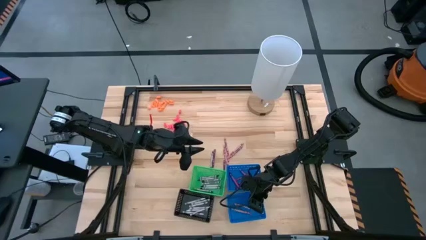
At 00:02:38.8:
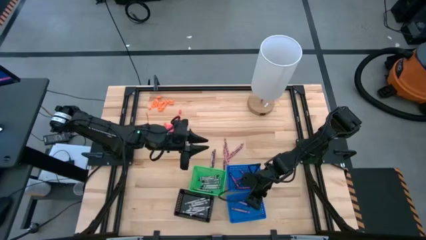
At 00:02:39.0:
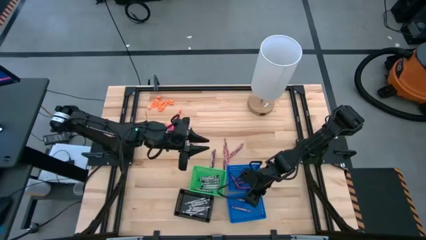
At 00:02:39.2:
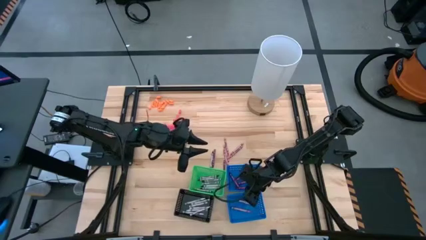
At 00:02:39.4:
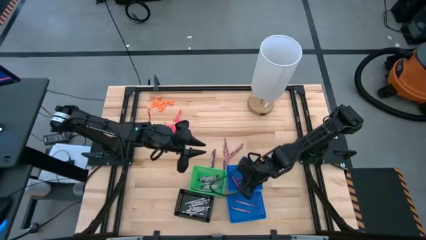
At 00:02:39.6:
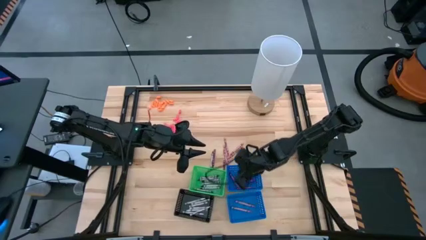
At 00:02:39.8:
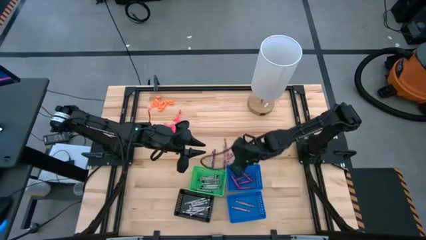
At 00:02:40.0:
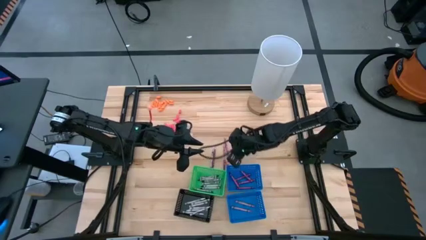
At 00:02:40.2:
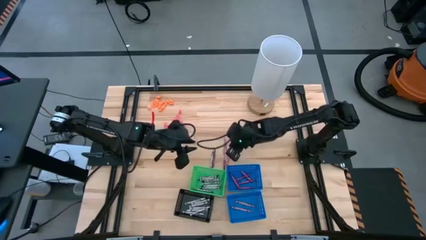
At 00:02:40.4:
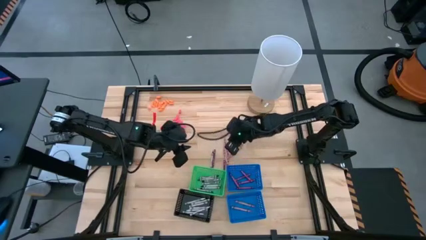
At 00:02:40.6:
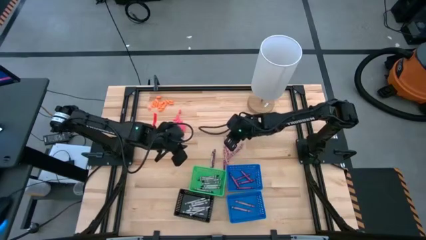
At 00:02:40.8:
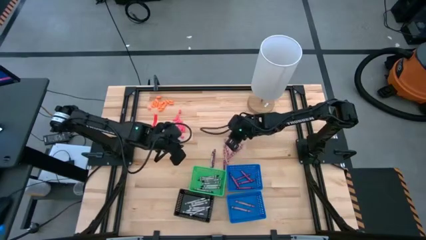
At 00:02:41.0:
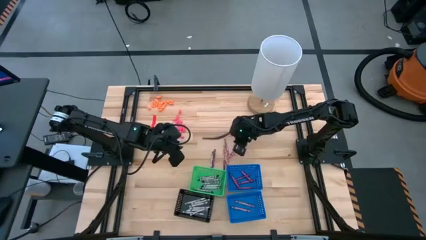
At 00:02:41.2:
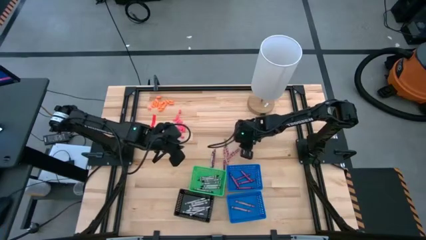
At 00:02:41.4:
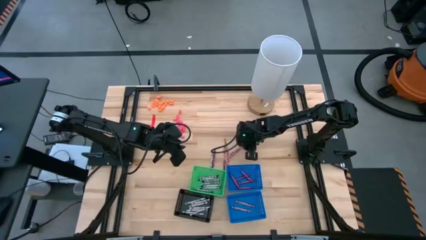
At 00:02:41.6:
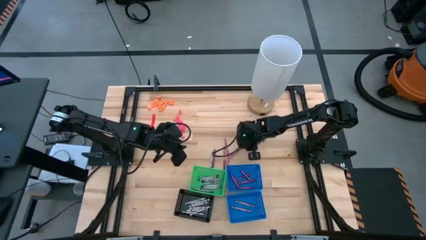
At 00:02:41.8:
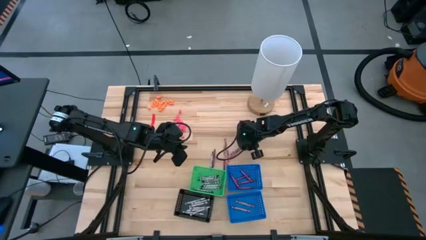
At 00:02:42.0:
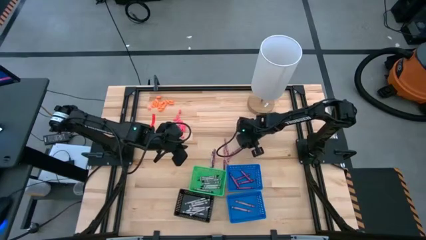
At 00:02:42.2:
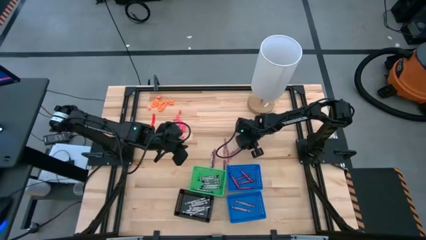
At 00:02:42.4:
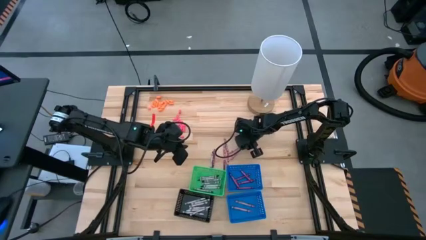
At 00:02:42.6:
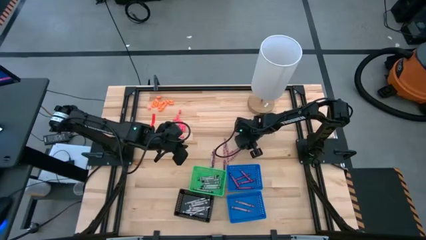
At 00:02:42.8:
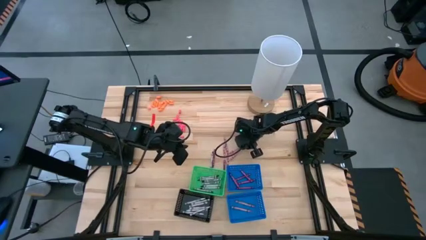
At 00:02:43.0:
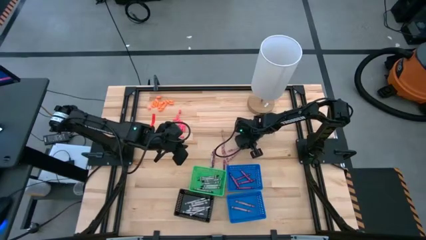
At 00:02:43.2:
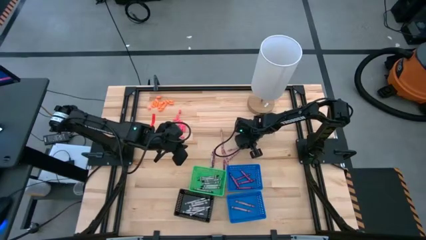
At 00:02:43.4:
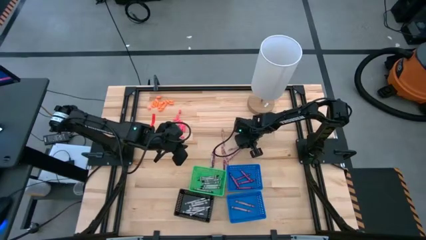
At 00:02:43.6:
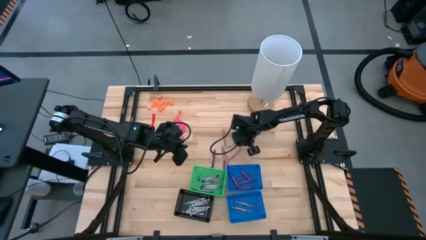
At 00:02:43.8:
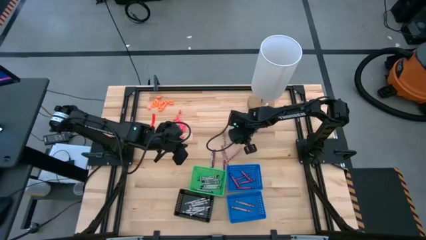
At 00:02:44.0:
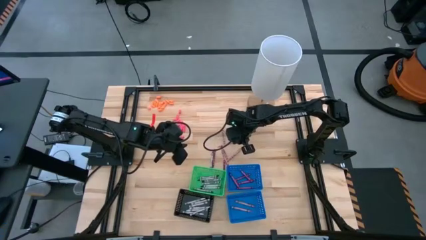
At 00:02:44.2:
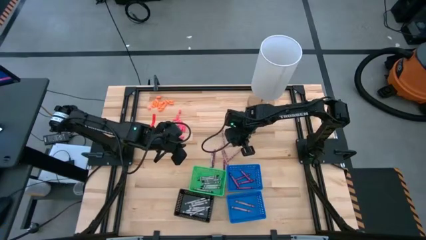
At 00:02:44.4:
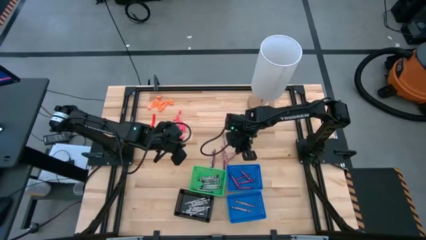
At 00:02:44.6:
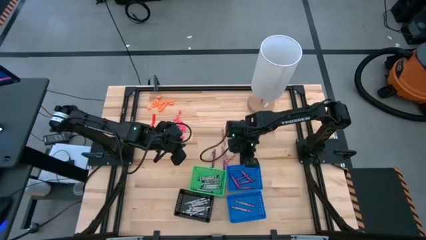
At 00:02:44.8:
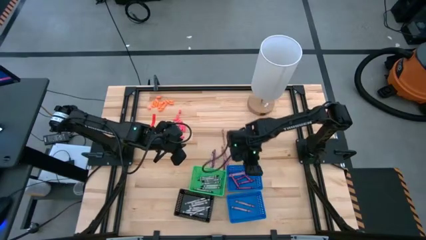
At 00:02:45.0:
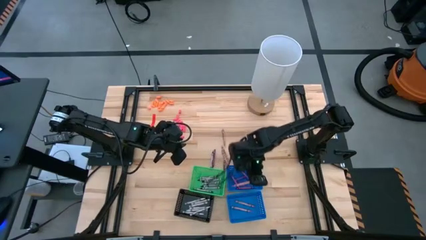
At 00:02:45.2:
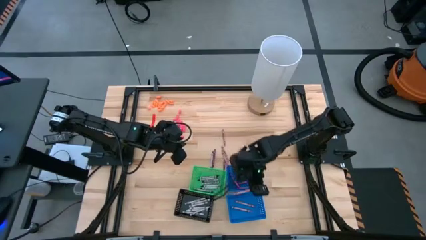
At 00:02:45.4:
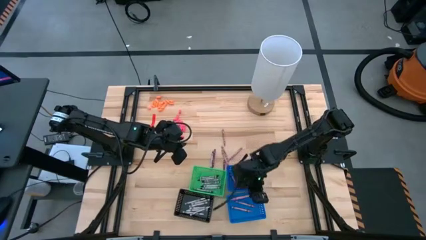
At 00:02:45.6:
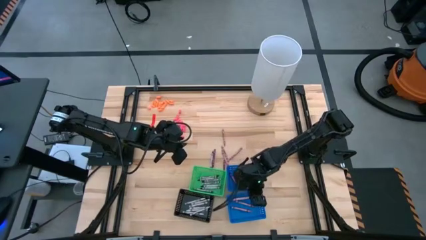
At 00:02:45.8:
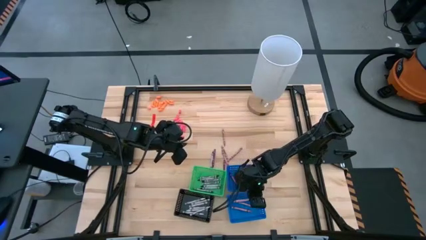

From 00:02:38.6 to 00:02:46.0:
Task: Sort crayons
Put the pink crayon into the bottom blue bin

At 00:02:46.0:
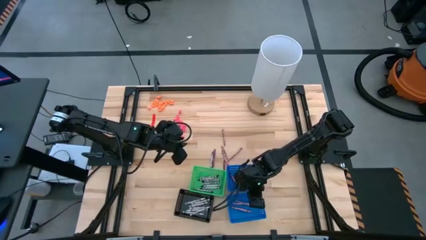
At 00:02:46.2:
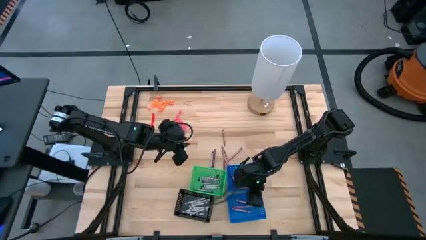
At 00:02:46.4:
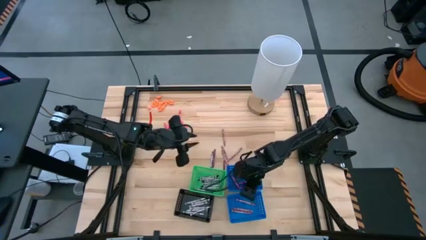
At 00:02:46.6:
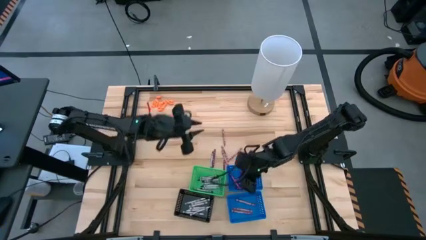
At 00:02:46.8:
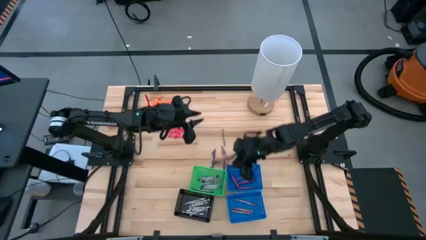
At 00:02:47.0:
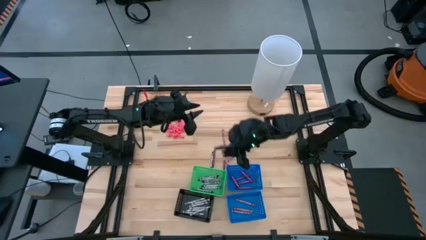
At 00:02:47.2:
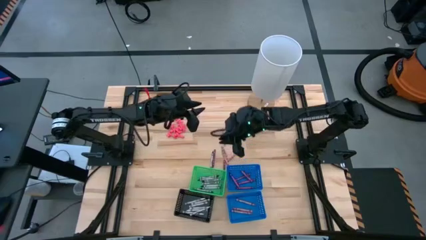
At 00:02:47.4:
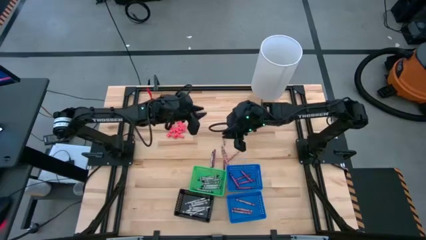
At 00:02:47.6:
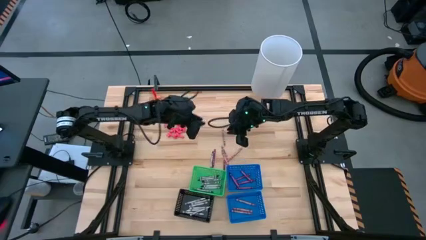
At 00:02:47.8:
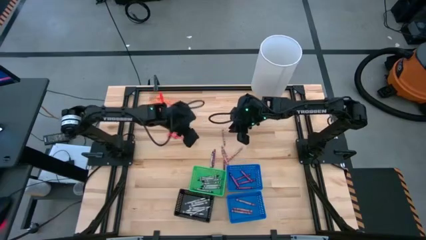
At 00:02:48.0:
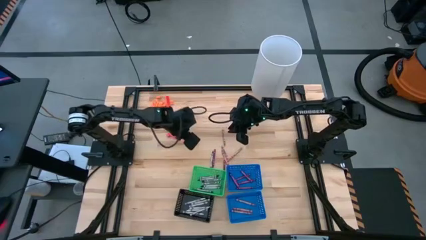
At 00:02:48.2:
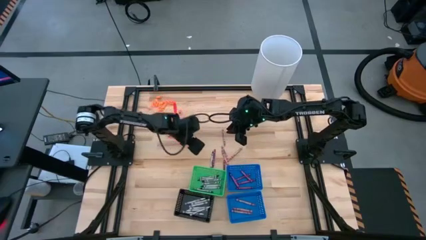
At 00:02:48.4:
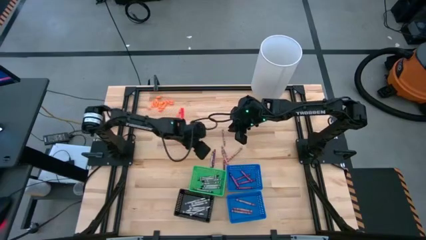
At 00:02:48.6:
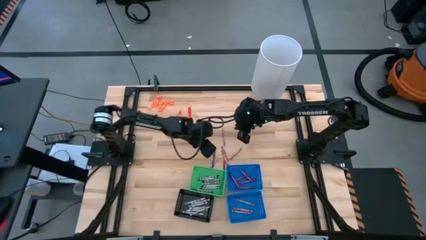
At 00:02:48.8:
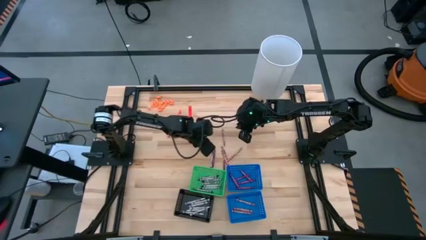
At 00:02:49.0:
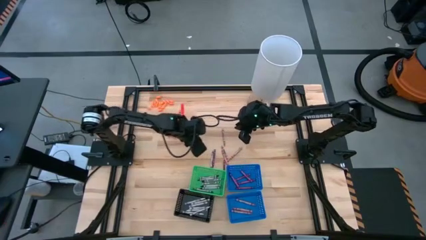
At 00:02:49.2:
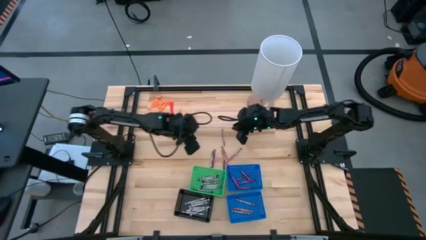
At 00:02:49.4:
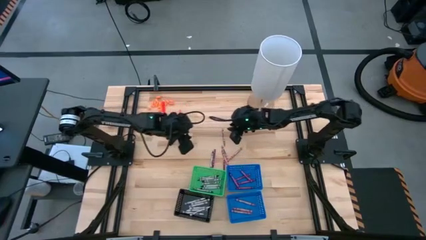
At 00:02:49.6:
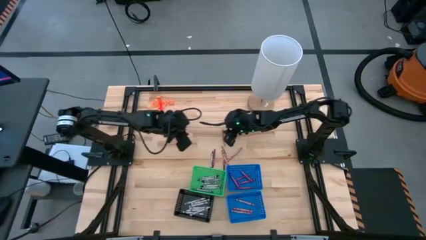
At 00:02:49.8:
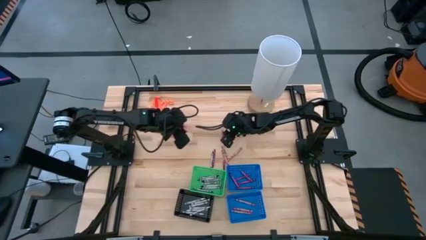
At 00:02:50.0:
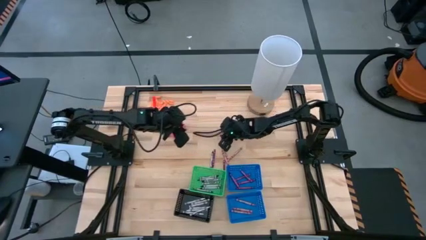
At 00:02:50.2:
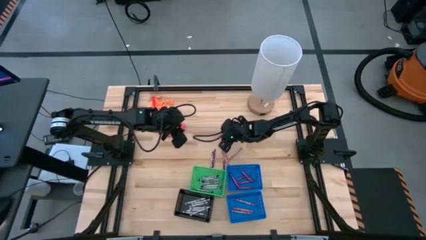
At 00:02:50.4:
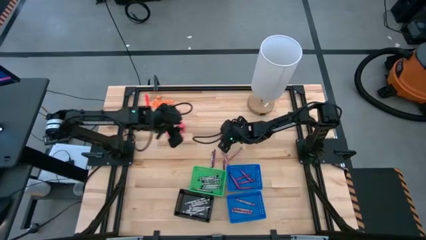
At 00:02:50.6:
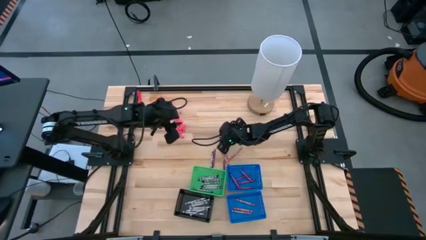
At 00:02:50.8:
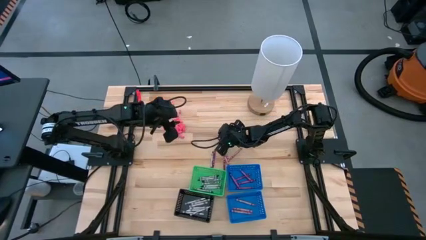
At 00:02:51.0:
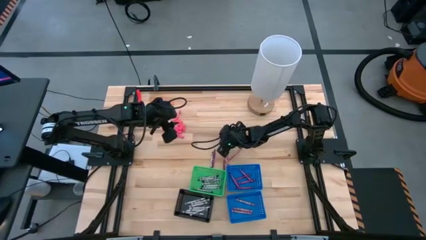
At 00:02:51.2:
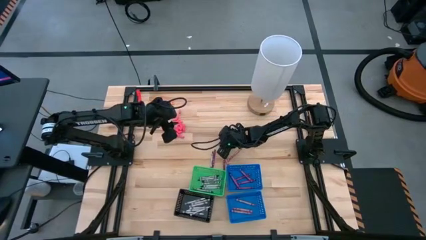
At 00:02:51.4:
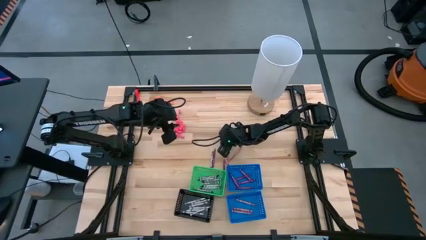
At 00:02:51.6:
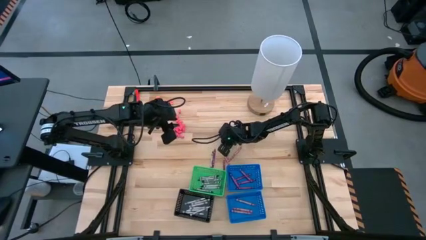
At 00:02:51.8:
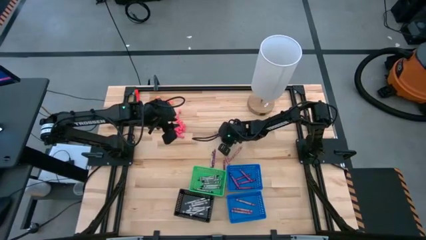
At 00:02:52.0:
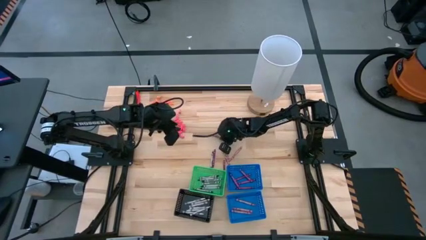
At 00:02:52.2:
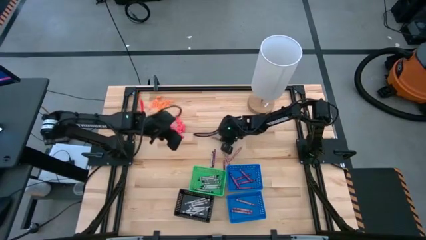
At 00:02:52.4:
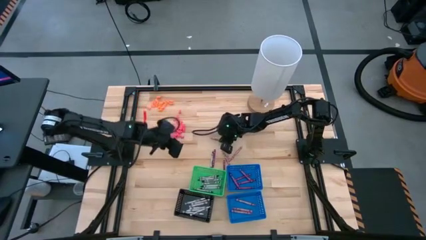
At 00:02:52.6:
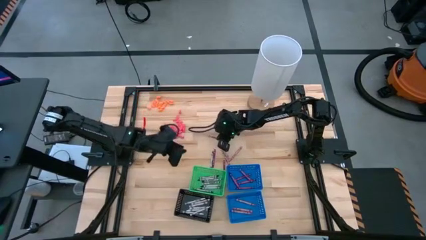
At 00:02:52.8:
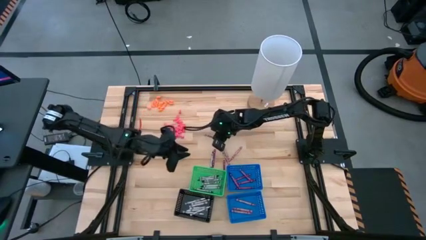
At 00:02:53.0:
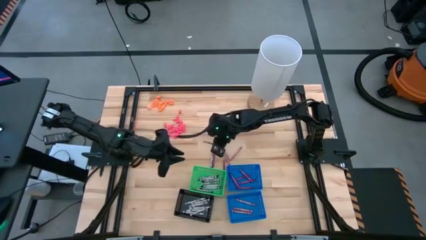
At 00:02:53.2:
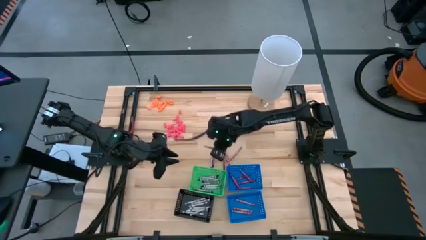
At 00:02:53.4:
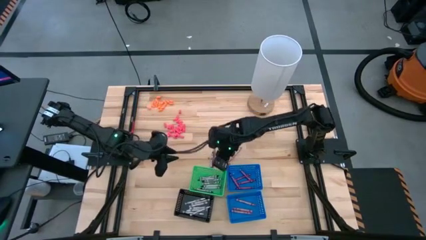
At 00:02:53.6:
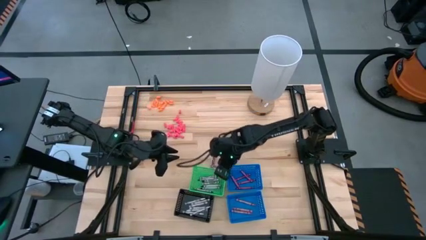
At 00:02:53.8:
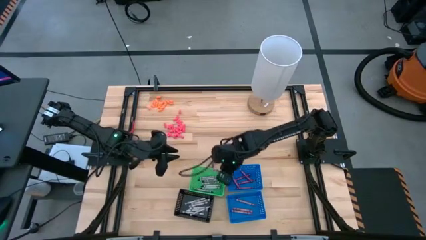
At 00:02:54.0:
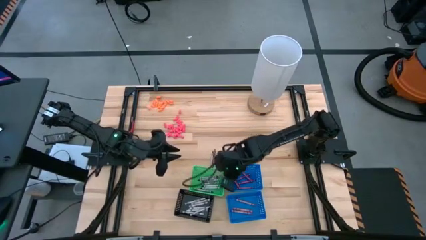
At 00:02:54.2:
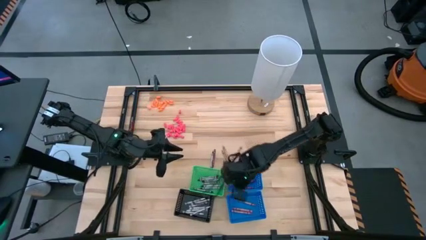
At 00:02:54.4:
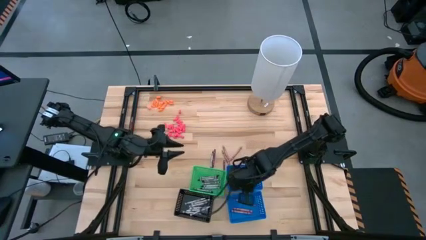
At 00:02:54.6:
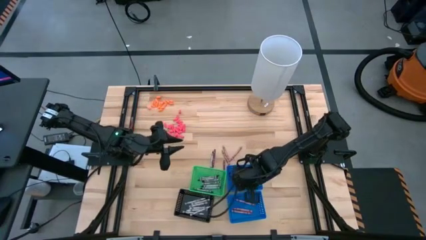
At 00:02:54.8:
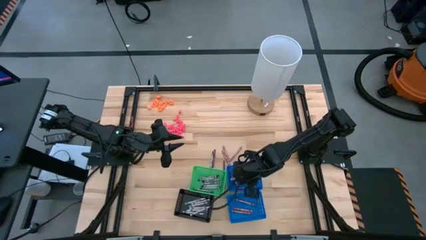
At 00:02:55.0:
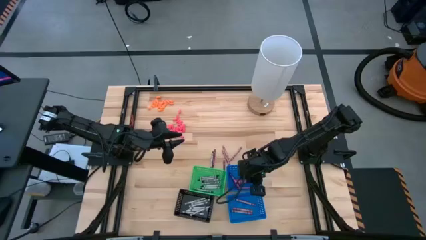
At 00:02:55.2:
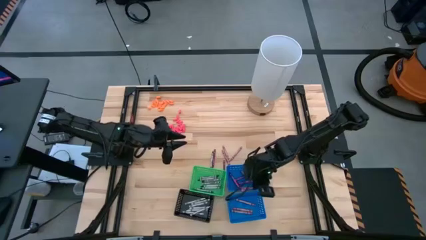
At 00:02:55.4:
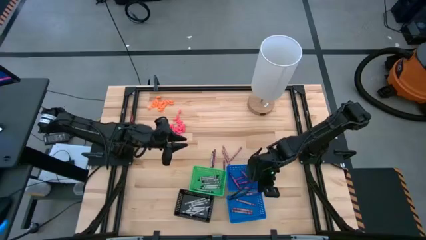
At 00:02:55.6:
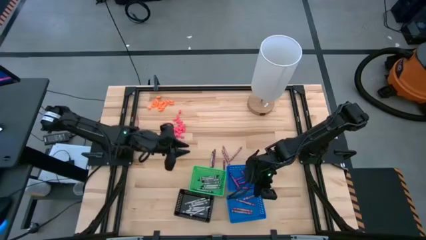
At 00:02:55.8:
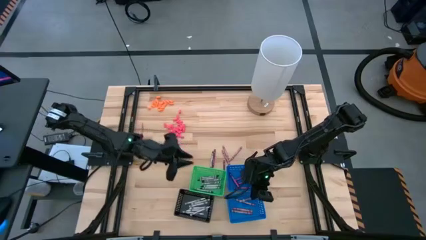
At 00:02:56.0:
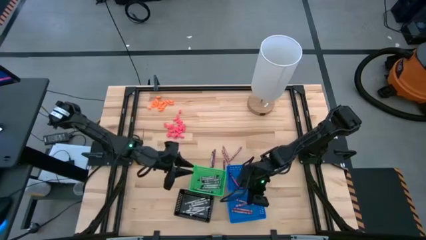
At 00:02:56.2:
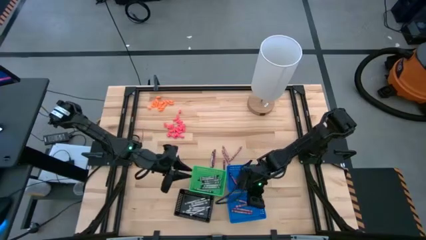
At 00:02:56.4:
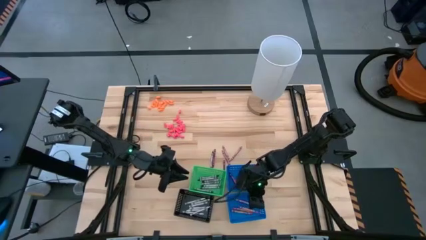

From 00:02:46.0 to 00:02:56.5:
Put the pink crayon into the bottom blue bin
